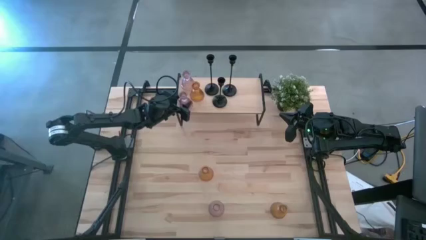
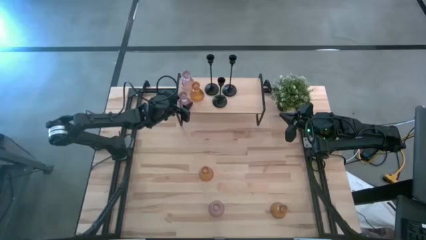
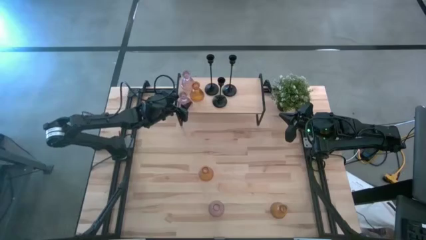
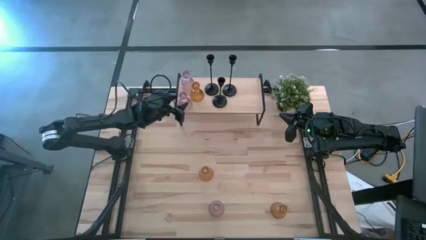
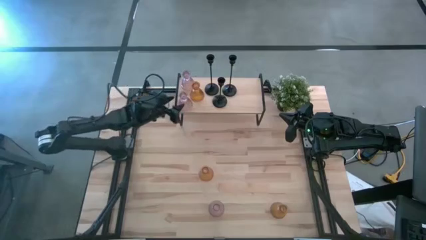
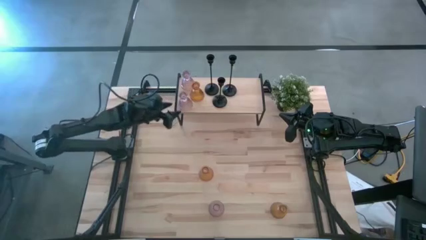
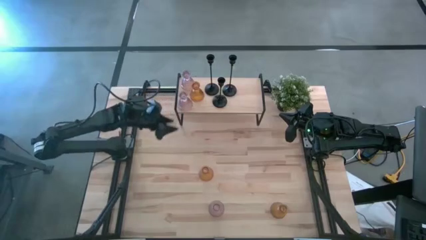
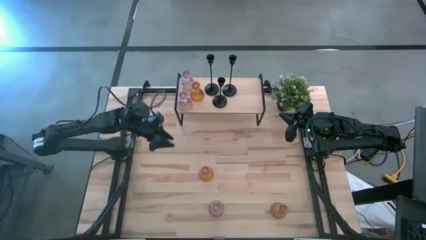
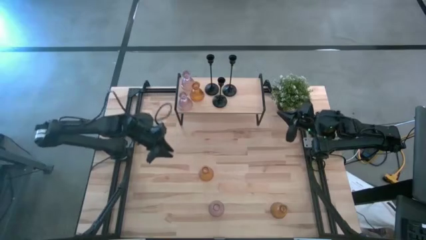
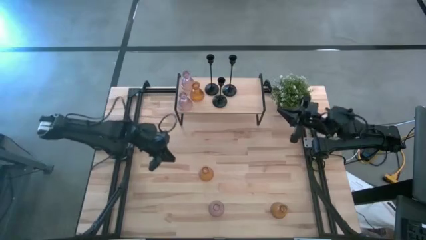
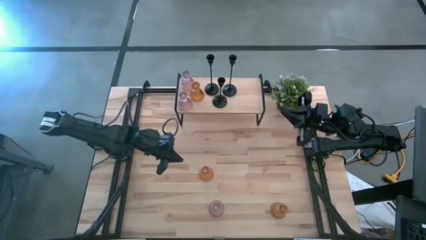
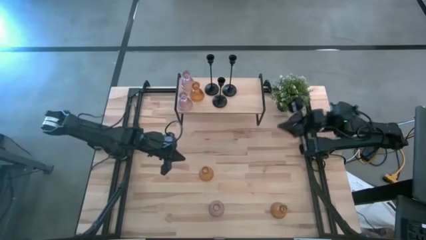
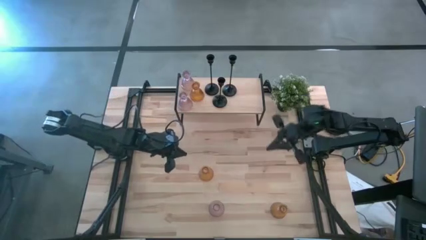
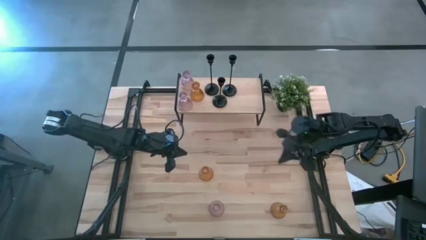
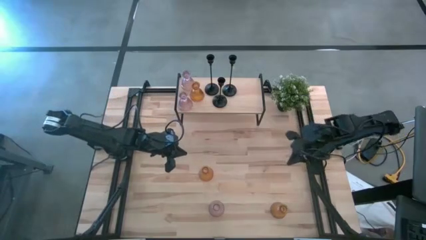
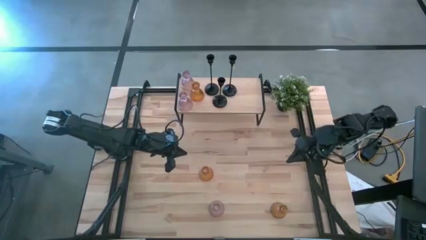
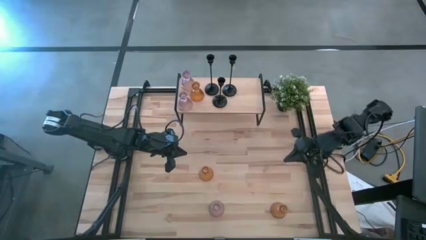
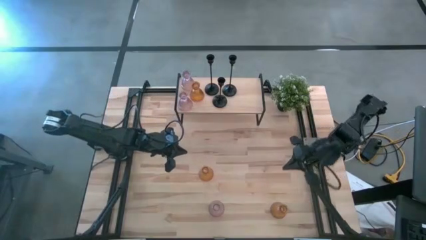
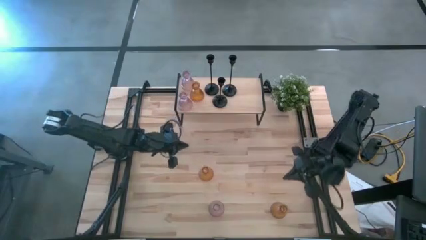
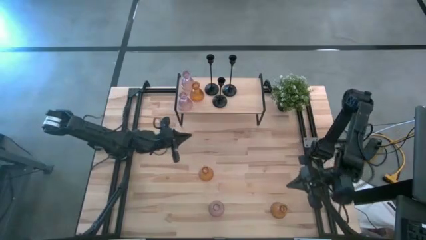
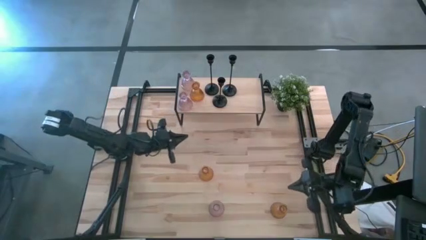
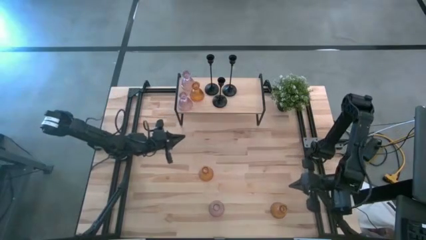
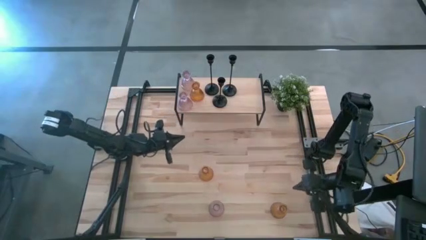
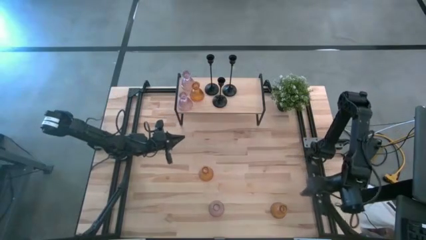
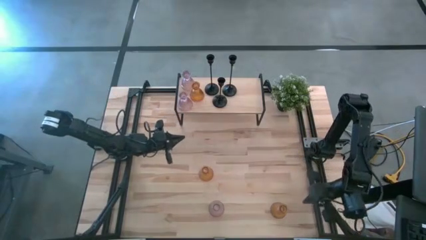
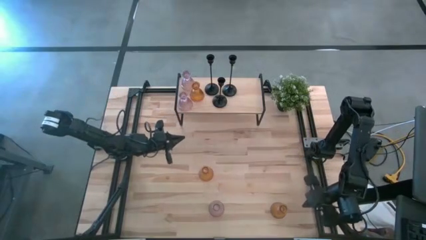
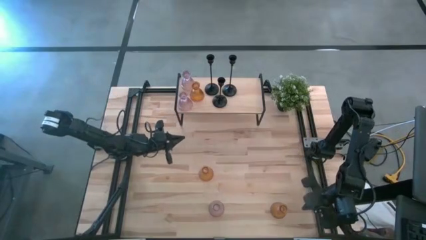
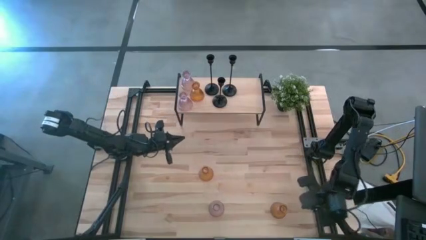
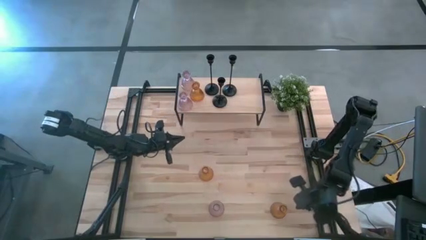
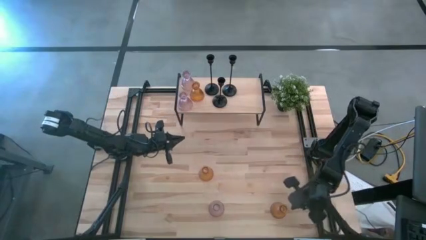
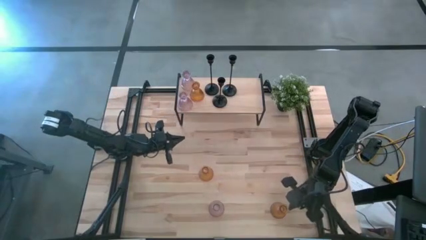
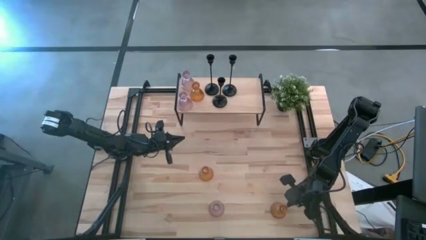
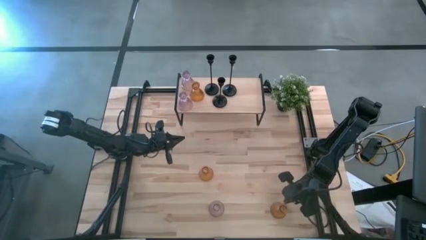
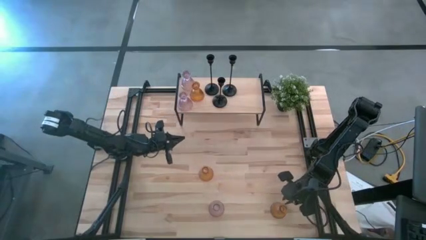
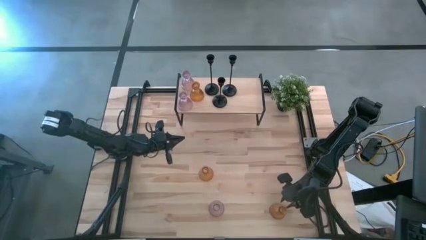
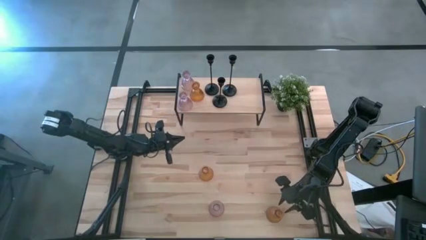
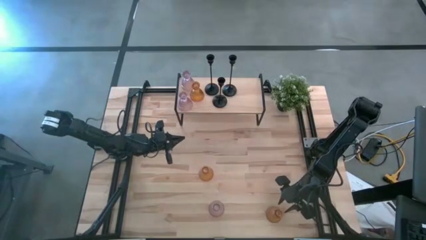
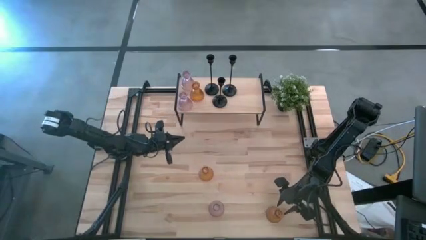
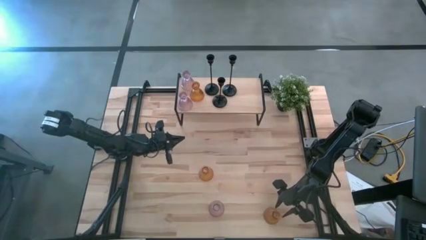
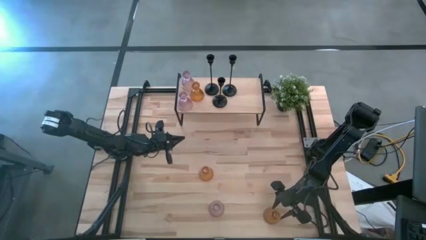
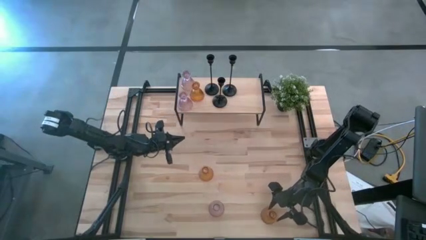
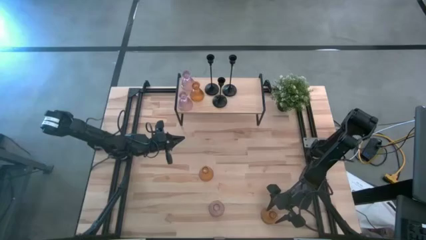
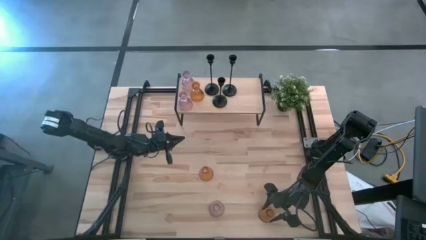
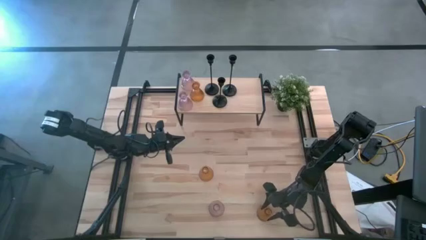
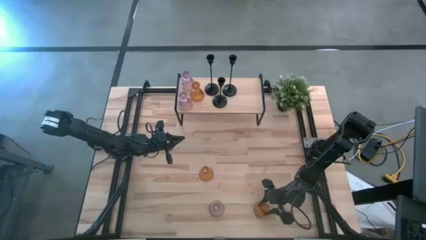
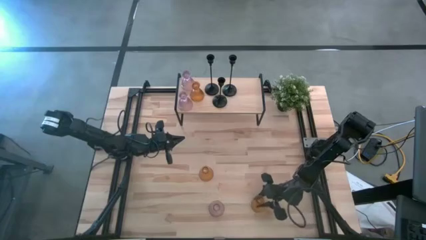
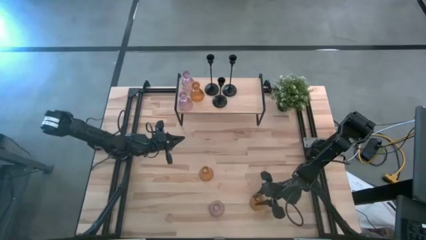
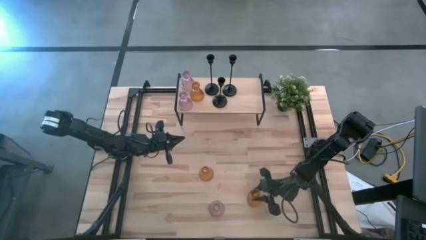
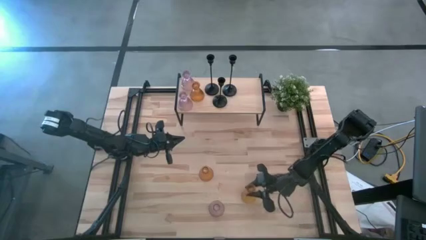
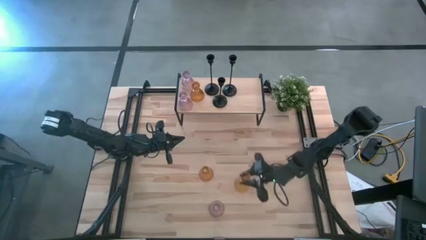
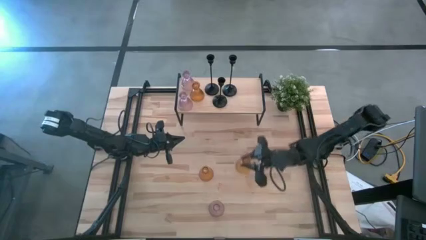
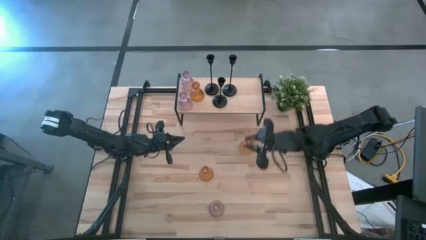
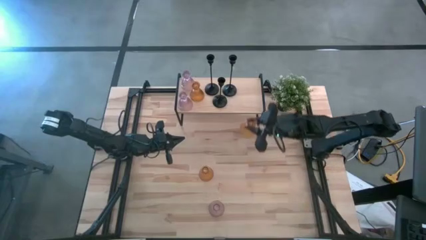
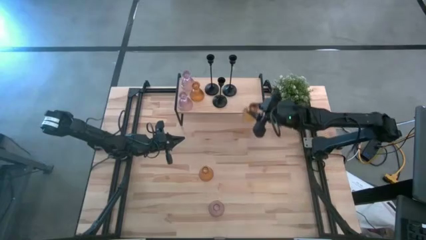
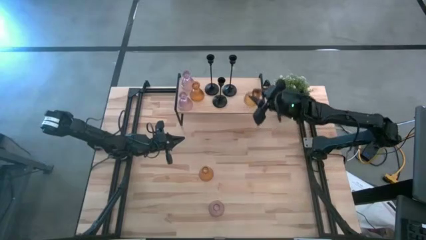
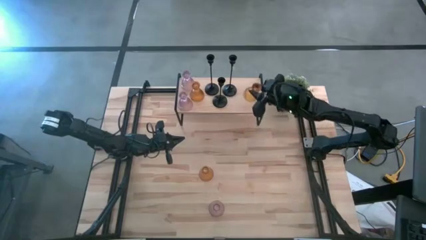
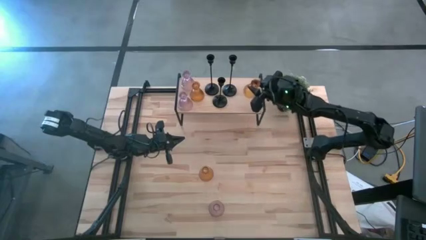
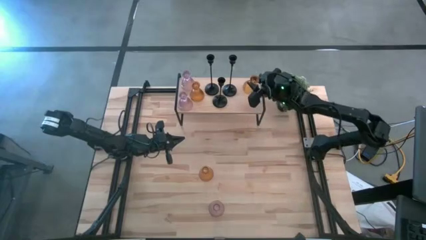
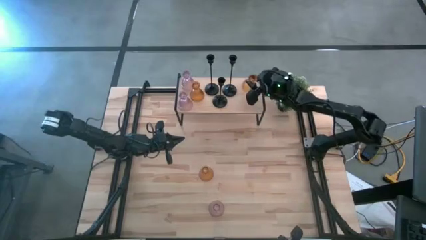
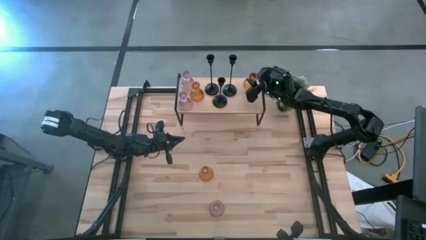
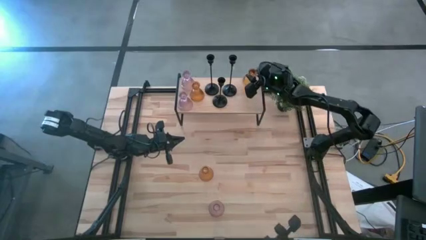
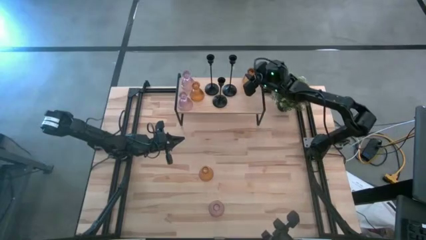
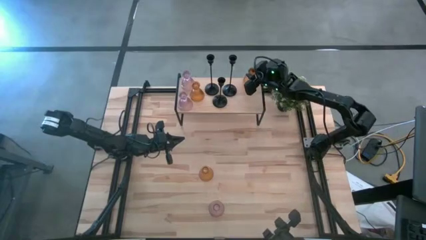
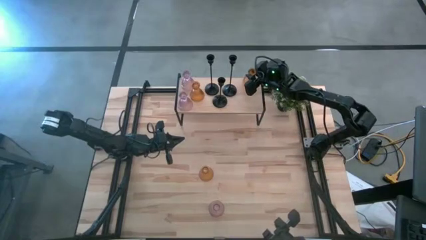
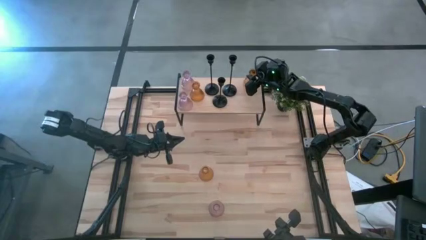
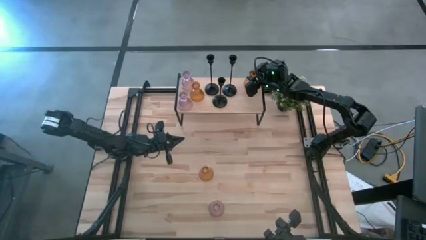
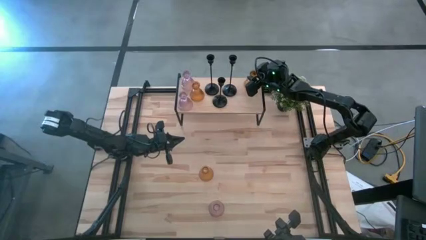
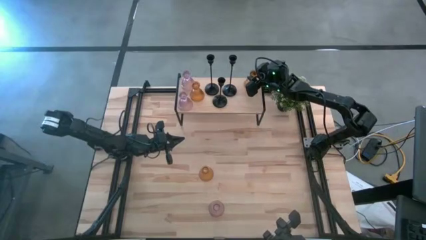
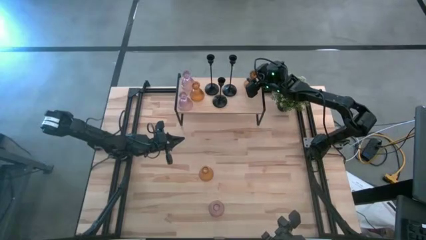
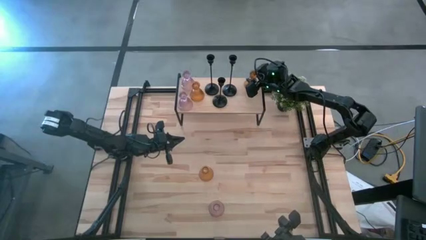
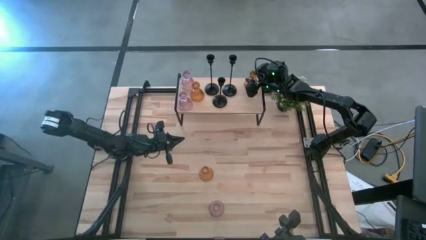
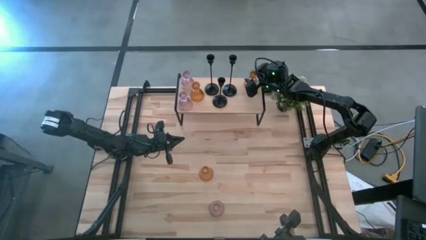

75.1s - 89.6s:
Task: Pick & Place candle stick holders
Put the bottom orange glass candle holder on the shelf
